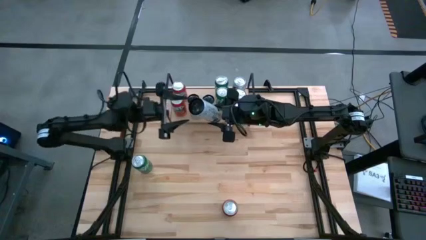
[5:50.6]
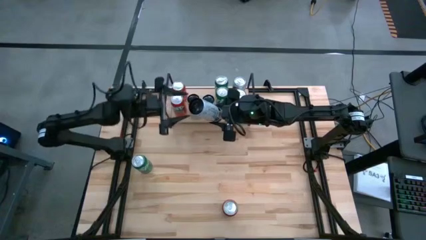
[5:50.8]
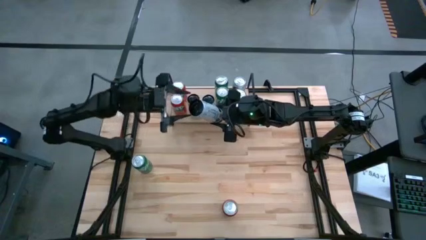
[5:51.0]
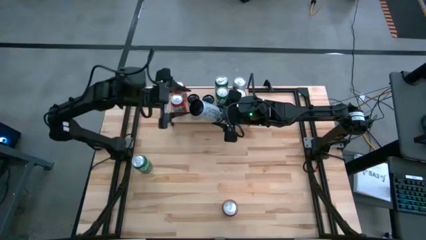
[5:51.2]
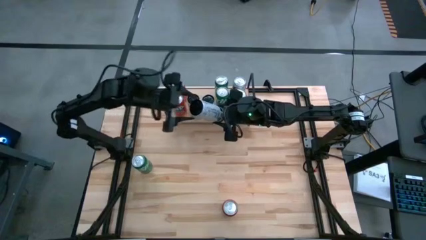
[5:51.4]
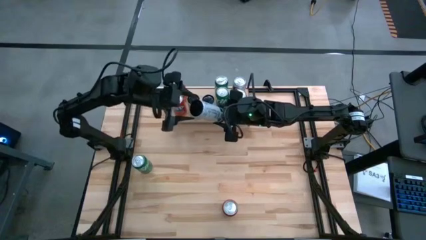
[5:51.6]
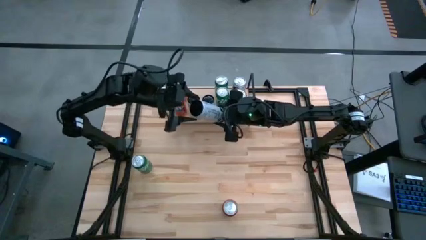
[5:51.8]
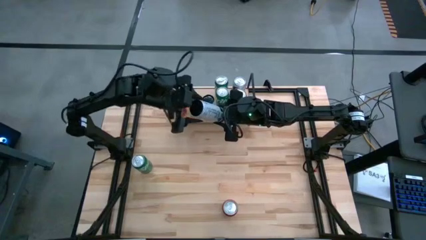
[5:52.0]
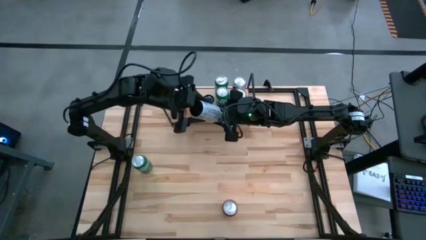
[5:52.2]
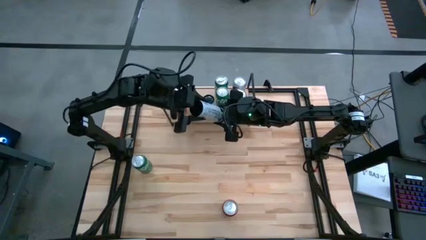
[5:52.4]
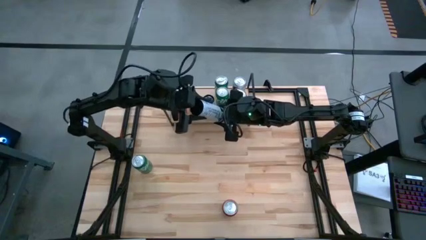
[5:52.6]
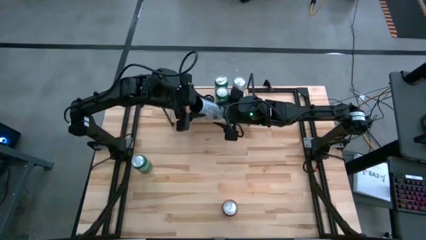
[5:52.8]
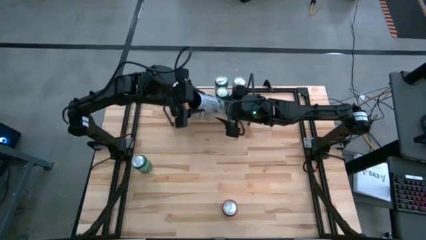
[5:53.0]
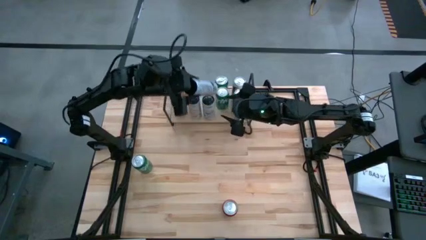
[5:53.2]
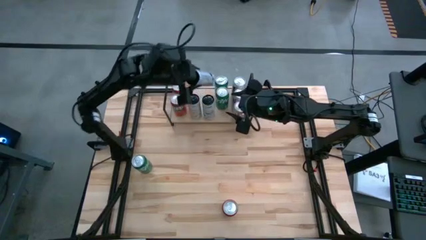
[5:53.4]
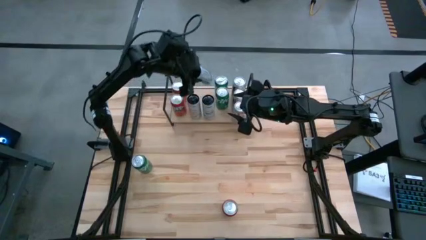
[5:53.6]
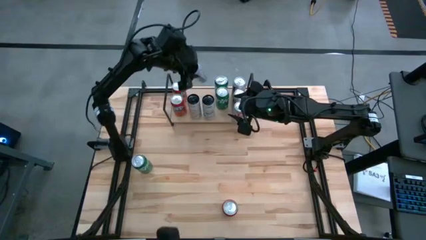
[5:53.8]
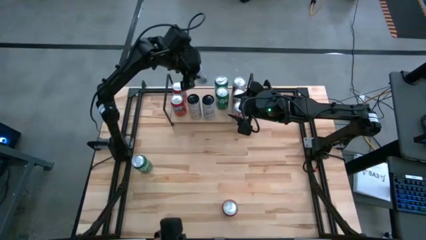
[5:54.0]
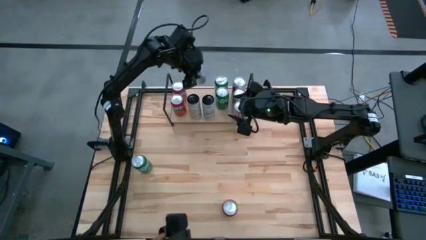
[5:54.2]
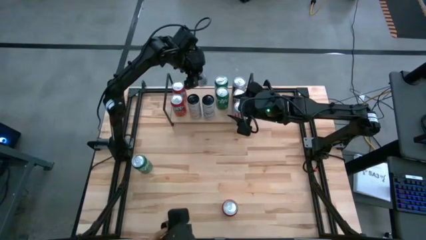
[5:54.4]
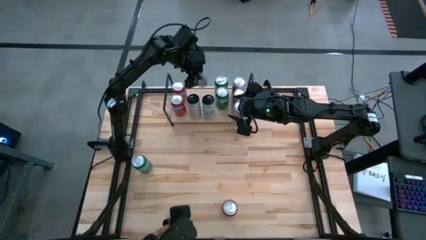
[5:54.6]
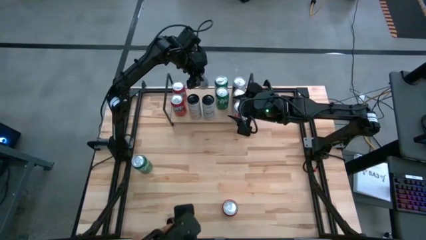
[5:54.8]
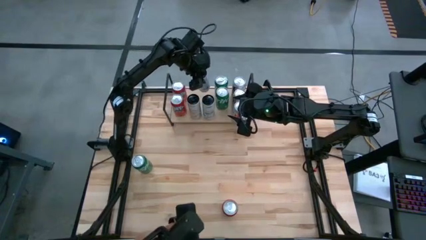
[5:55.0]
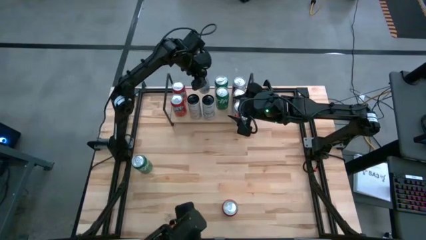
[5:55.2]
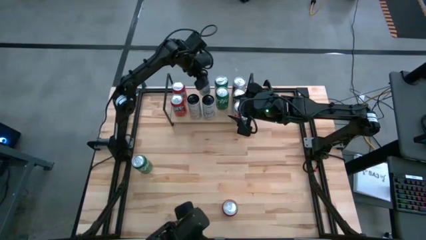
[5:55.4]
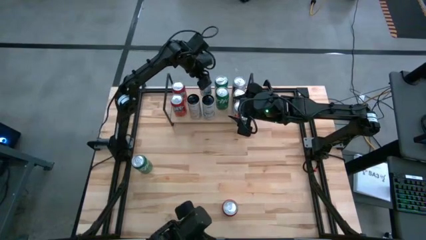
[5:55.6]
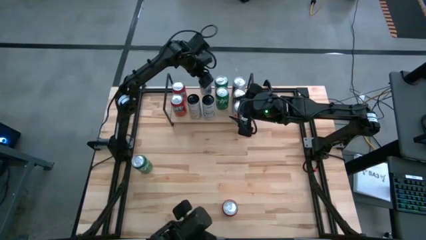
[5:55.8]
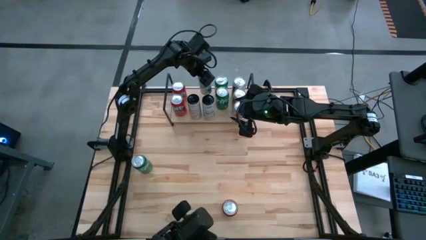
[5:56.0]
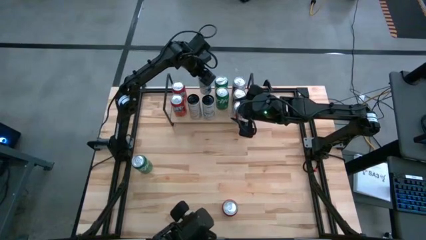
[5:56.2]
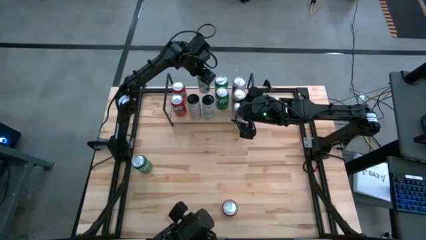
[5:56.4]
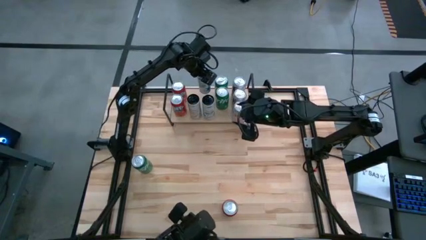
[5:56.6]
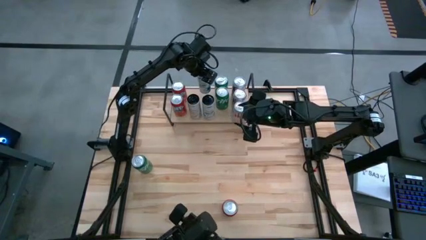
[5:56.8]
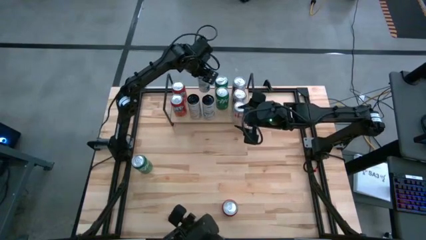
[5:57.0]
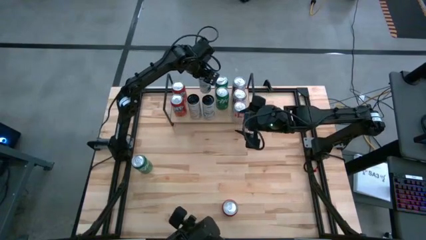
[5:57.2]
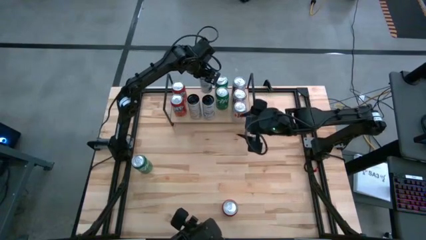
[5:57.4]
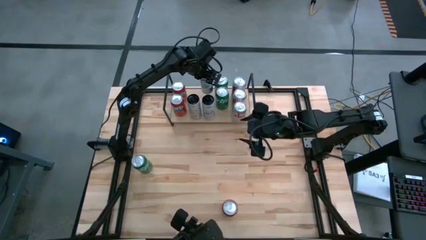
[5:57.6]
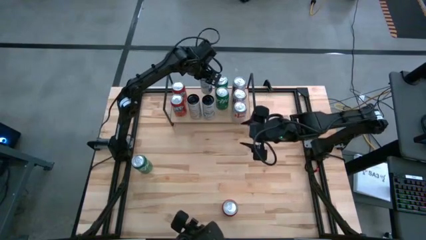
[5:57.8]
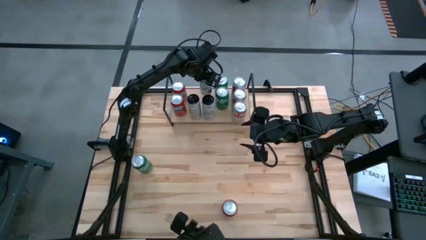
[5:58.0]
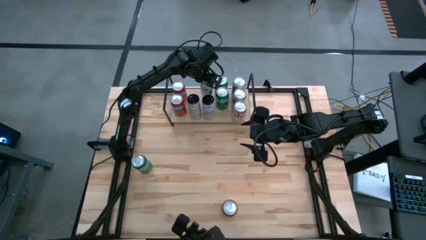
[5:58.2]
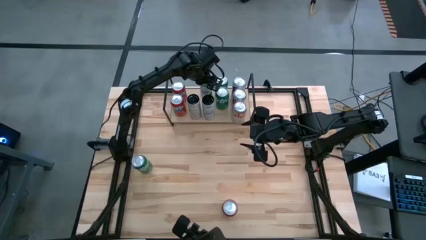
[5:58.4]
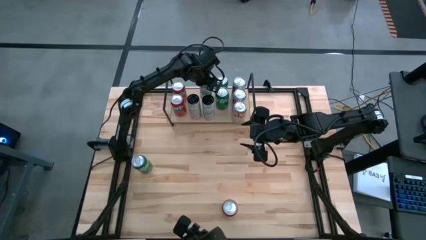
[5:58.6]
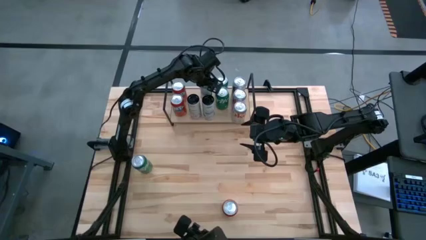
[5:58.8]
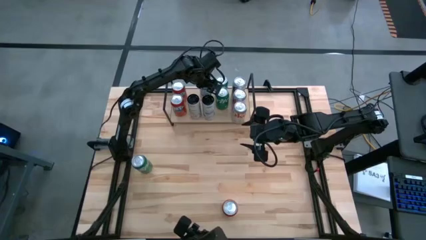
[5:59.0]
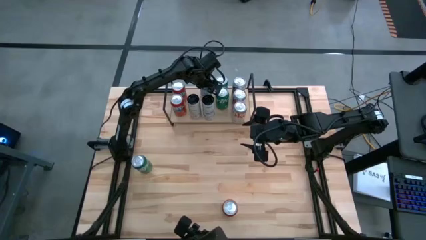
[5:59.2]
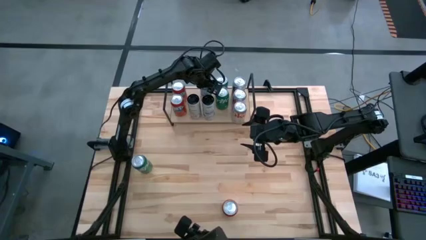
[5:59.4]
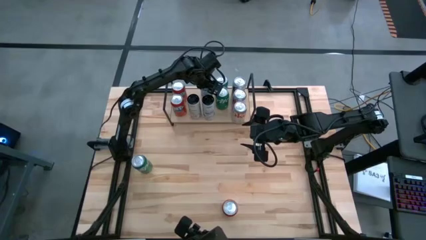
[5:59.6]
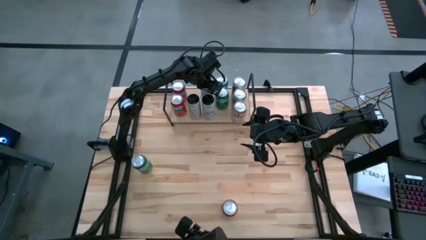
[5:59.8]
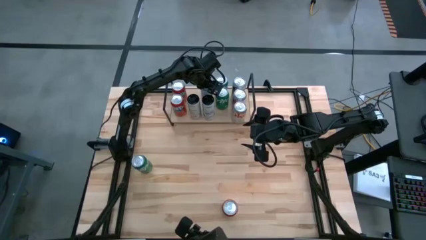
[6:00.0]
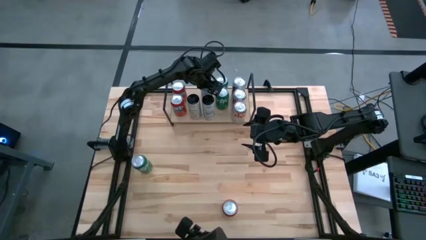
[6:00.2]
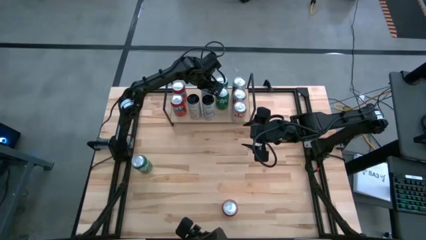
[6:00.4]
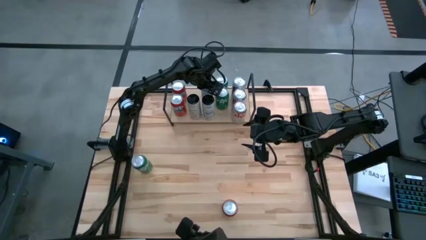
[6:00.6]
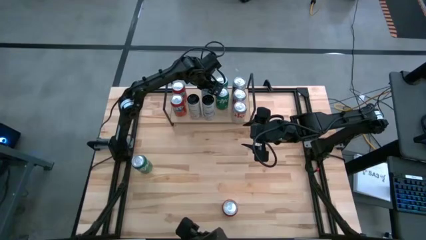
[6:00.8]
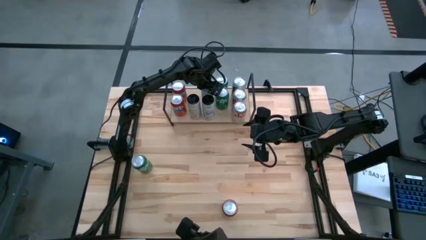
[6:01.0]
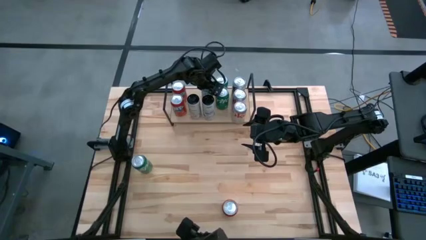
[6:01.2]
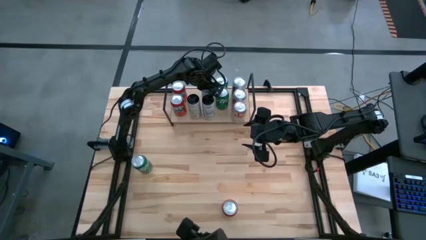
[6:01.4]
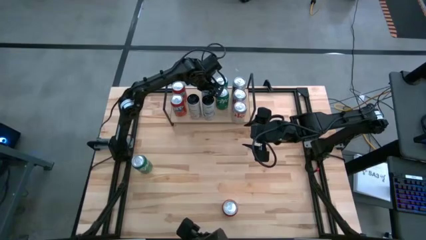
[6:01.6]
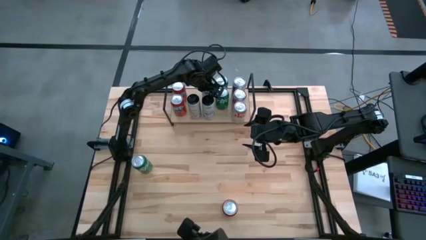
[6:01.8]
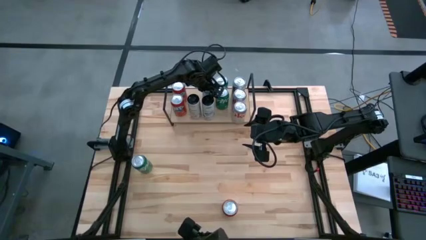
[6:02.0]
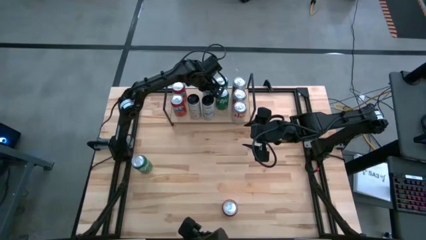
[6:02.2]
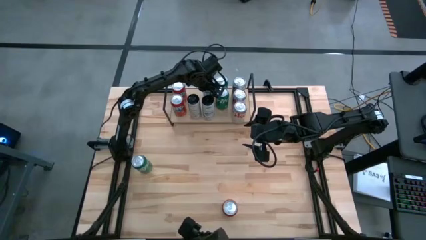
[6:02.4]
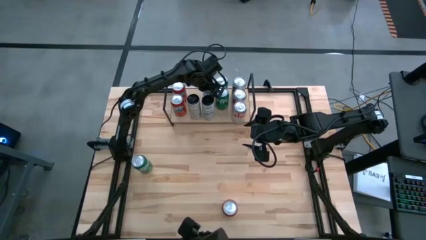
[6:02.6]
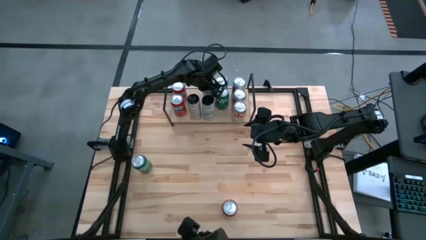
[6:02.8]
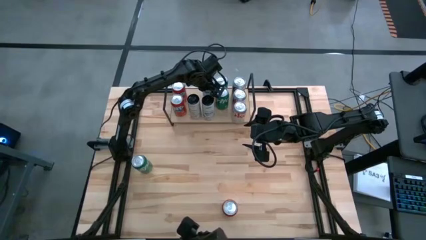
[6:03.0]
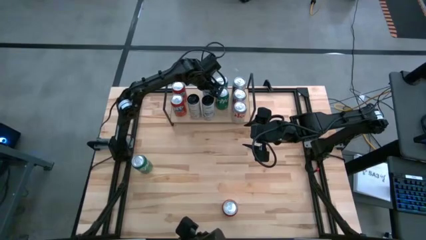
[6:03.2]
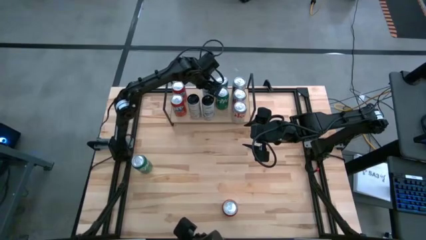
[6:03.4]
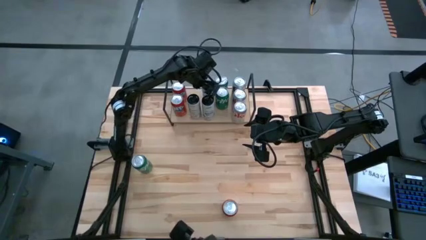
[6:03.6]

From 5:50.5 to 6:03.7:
Task: Sort soda cans
Put the white blue soda can on the shelf and align it with the other white blue soda can
